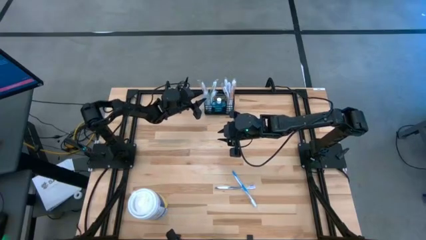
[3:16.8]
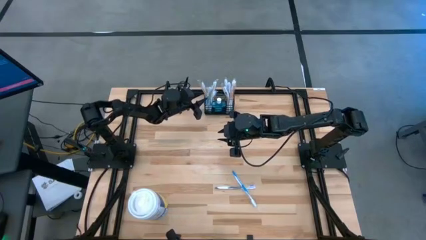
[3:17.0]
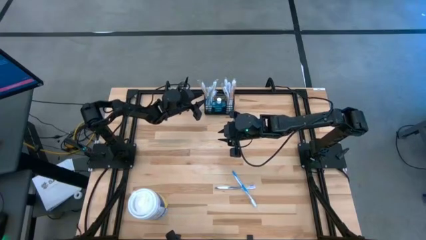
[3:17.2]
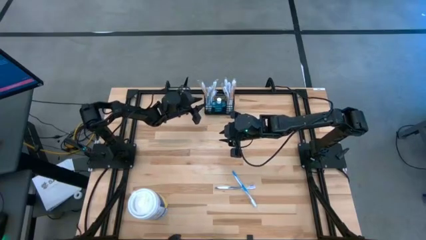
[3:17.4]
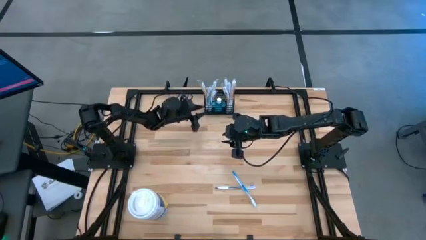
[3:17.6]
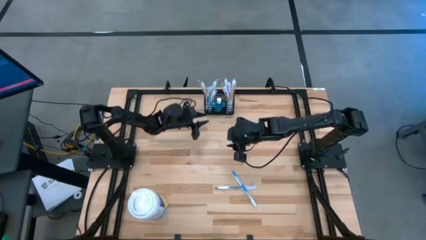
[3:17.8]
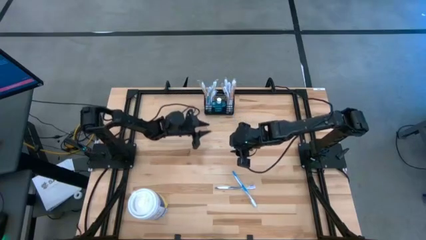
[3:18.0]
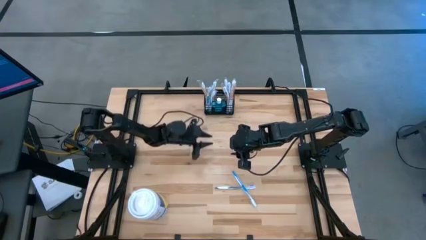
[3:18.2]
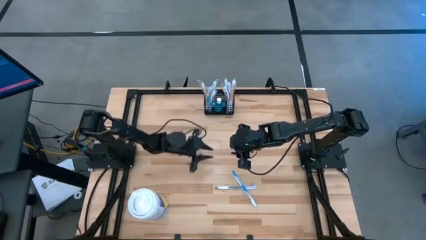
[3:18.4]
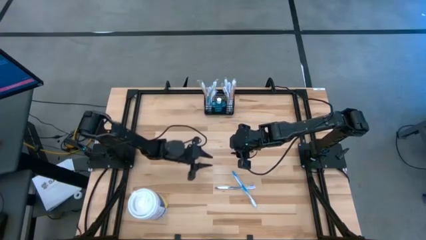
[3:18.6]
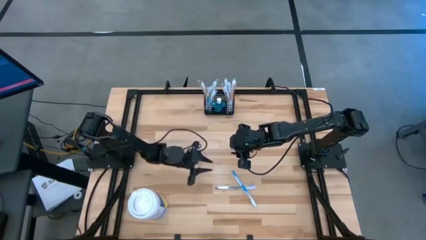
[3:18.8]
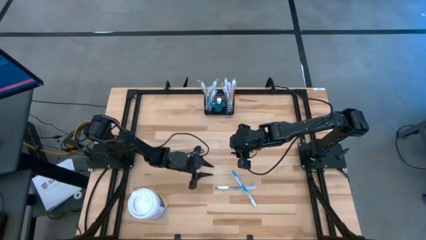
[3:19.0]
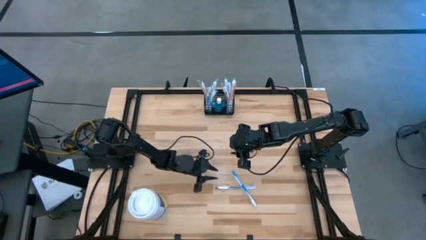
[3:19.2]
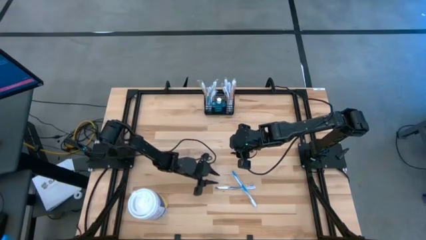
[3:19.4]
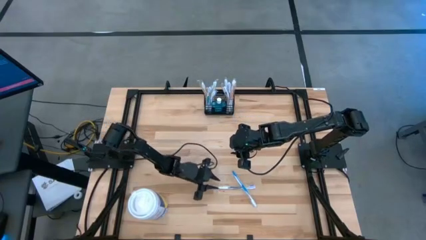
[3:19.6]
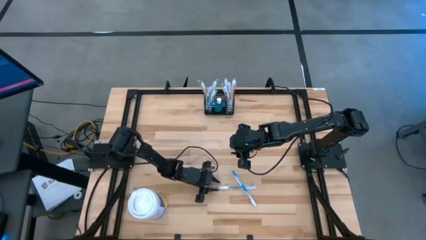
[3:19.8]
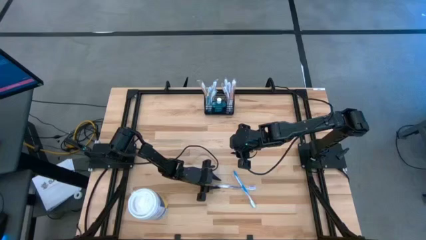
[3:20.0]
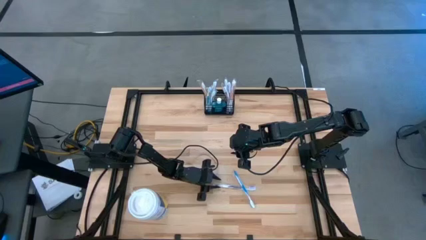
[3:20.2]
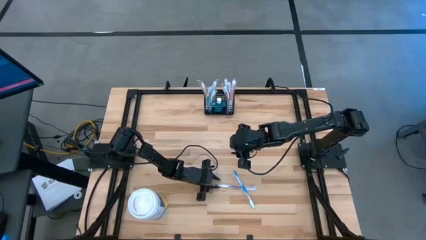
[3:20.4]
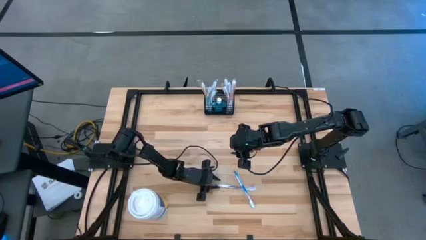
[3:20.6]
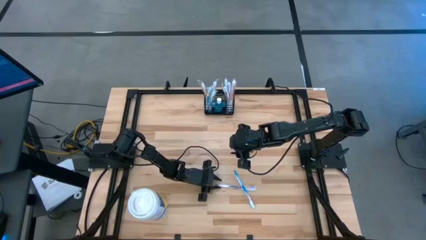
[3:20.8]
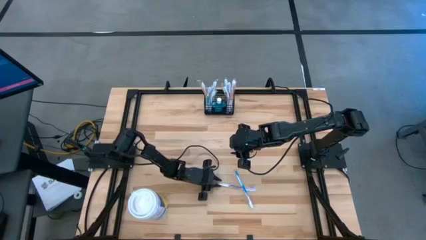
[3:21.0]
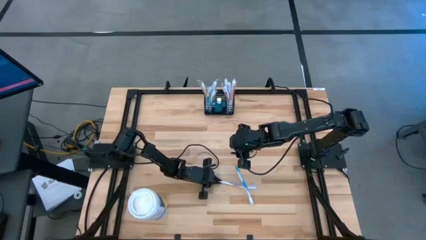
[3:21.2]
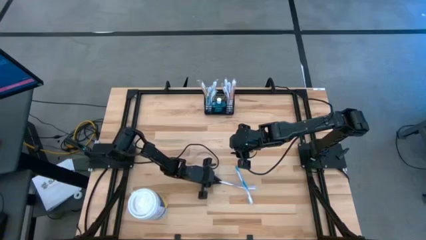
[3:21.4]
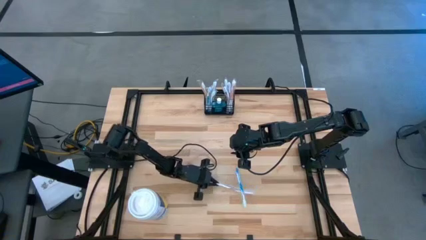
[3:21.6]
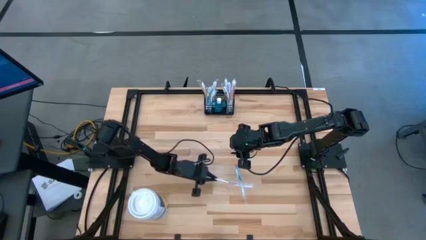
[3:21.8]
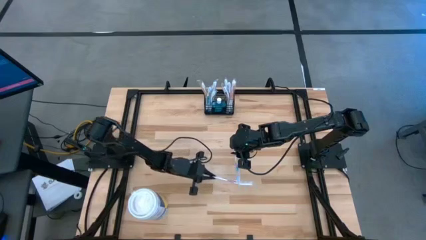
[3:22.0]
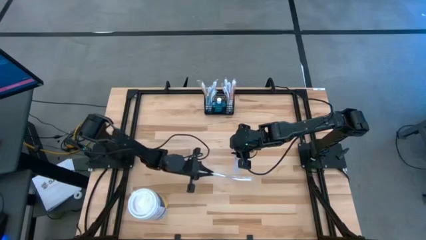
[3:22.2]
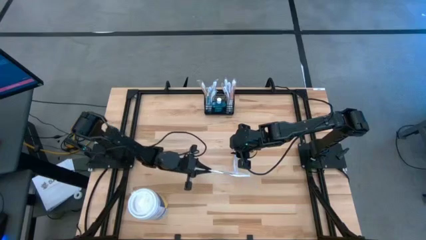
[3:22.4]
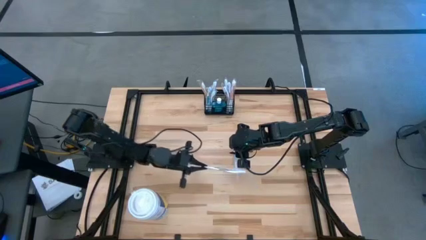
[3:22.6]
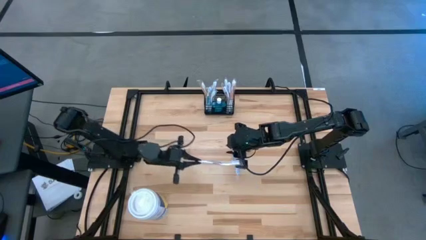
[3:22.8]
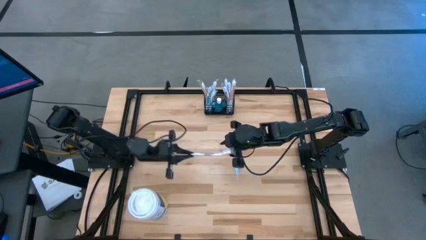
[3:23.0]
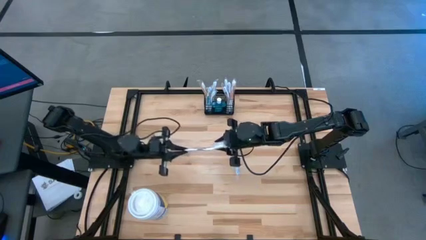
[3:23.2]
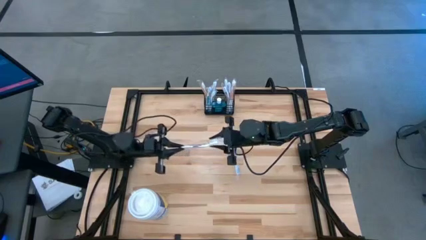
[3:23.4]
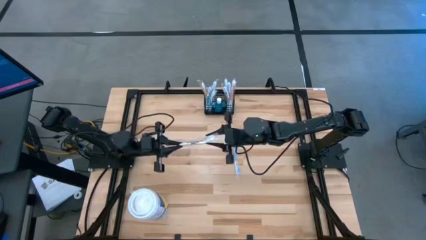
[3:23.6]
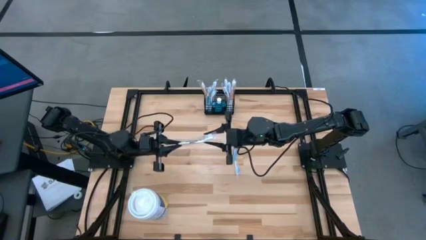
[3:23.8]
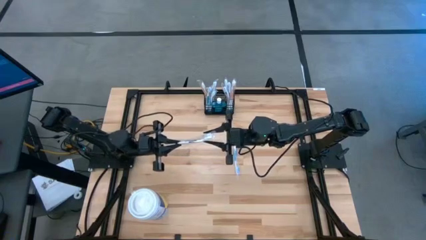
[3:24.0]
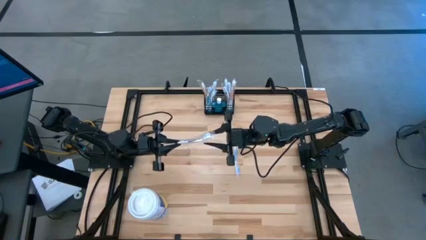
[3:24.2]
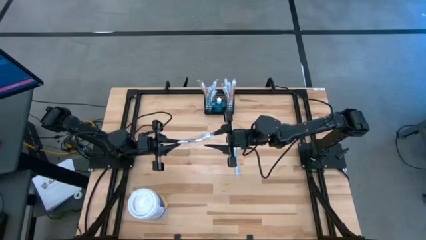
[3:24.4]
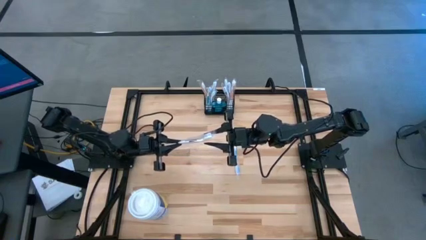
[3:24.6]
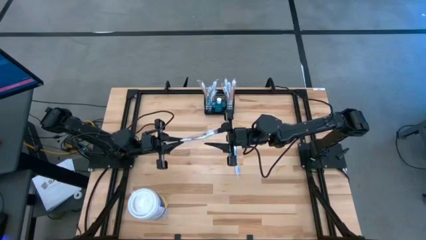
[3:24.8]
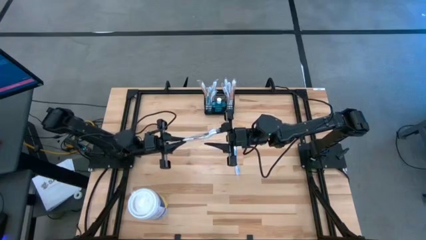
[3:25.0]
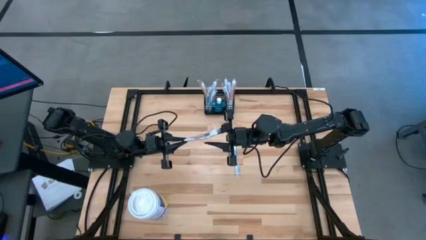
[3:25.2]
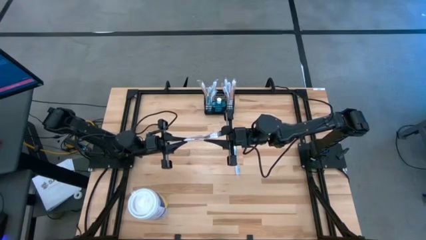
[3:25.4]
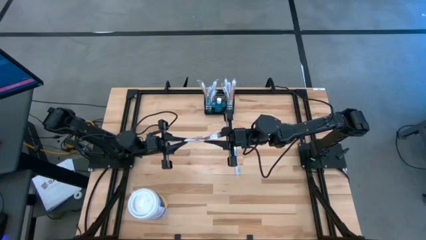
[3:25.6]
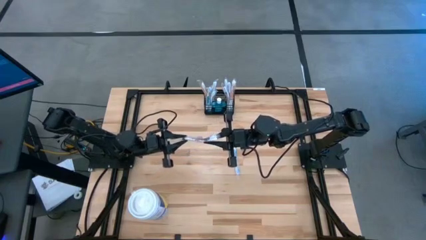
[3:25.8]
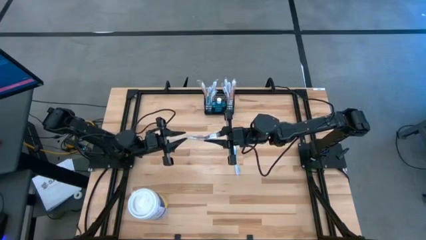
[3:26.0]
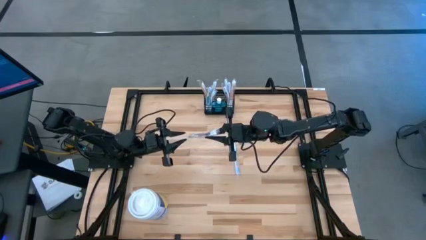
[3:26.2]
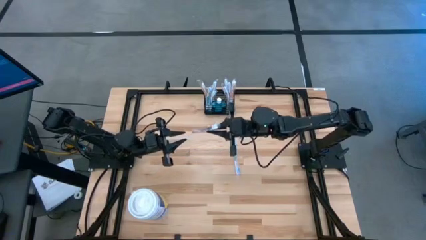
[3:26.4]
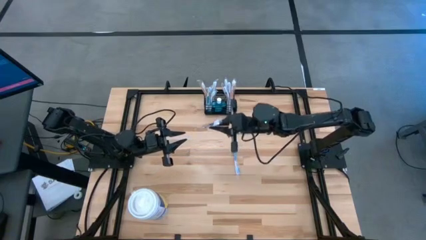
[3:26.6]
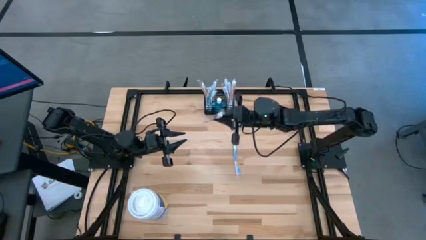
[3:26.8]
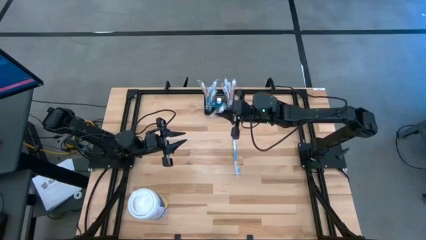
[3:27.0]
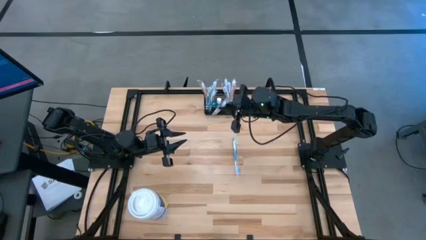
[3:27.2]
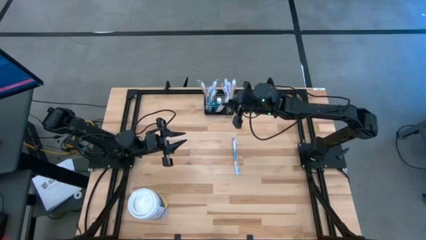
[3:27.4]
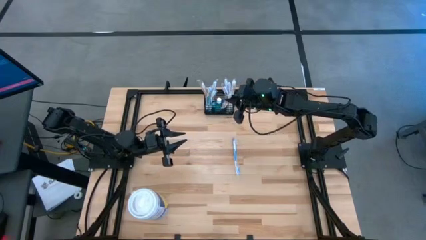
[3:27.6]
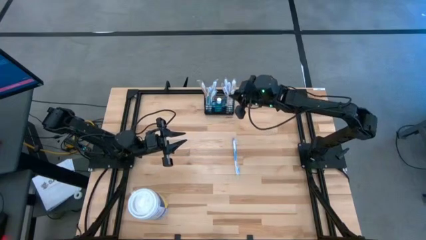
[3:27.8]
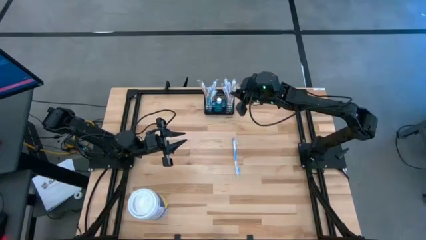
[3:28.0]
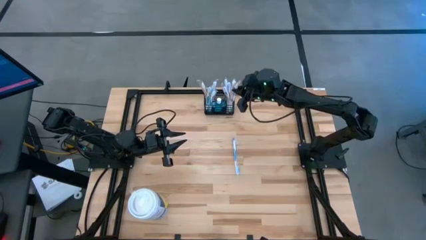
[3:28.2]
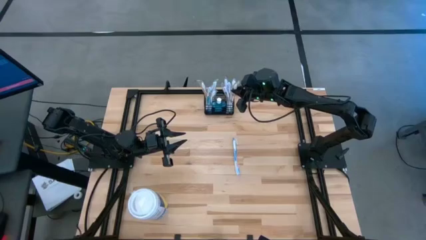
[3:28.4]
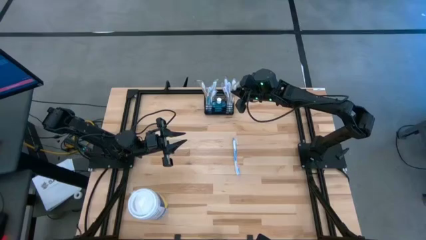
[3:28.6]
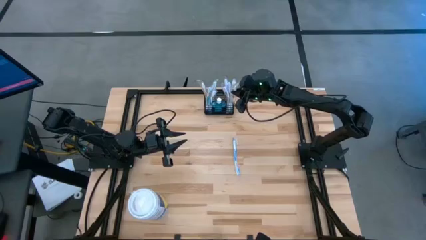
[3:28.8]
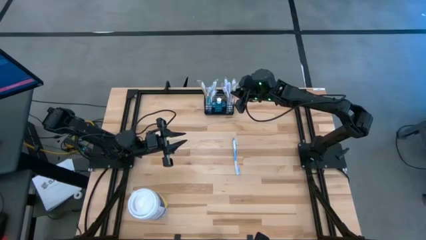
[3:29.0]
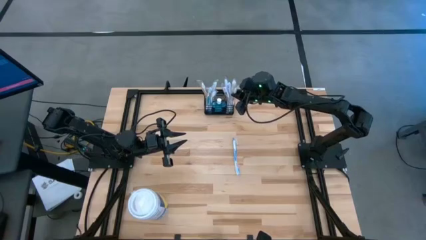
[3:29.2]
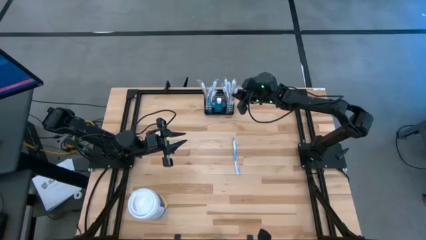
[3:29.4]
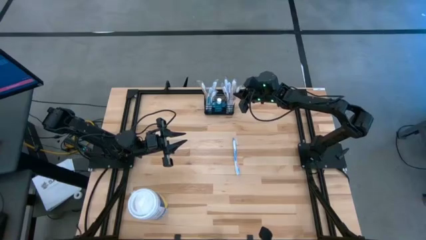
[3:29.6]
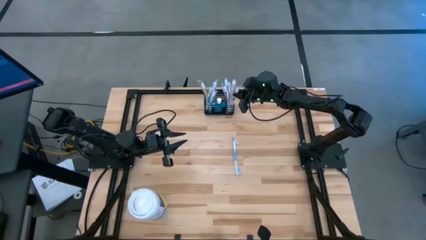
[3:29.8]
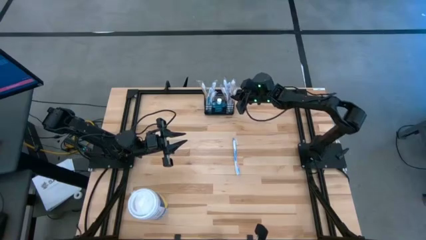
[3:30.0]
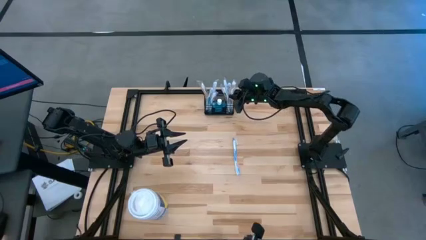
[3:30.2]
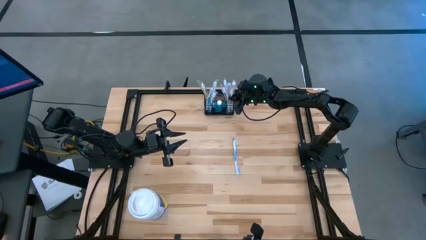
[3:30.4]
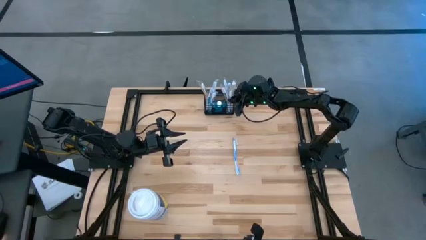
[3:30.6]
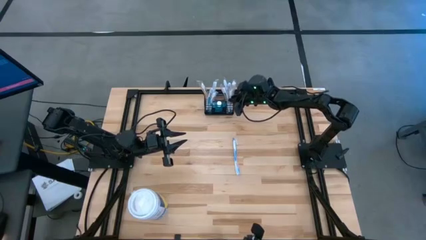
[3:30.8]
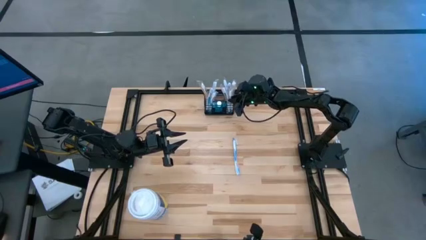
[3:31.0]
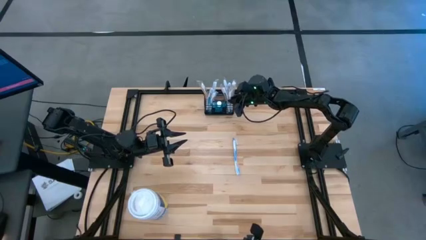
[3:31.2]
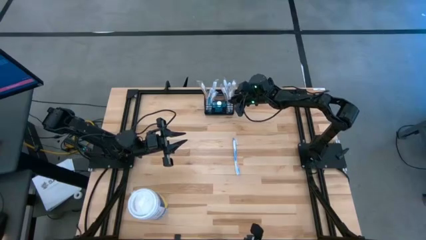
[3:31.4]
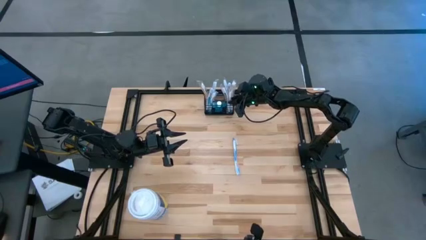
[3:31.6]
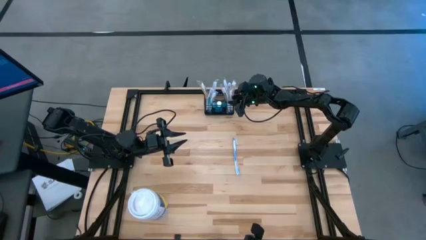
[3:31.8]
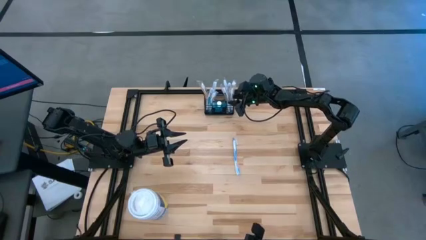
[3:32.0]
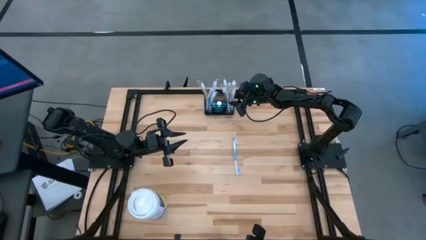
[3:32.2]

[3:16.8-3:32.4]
Task: Pick & Place toothbrushing station
Put the purple toothbrush into the mesh organizer
